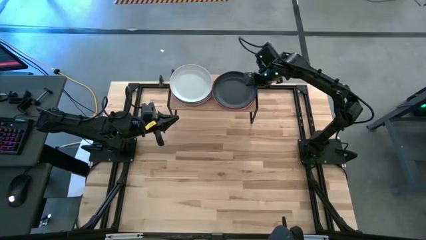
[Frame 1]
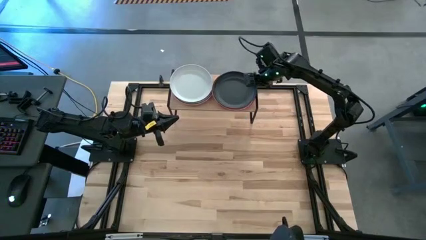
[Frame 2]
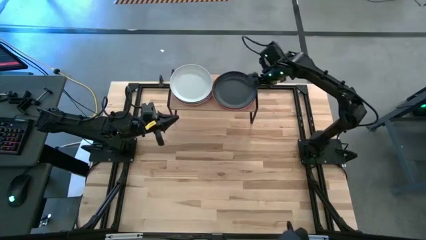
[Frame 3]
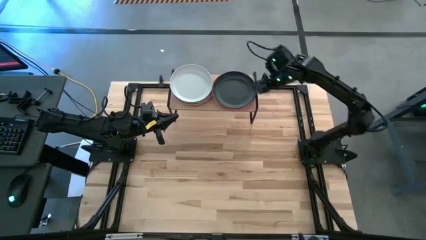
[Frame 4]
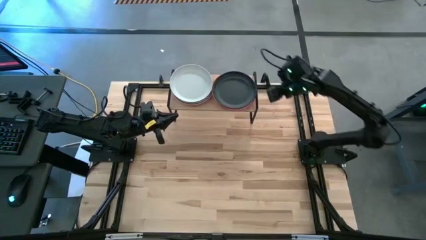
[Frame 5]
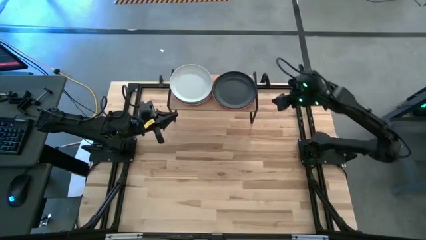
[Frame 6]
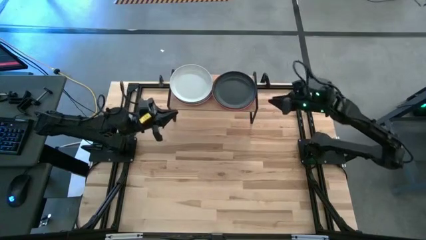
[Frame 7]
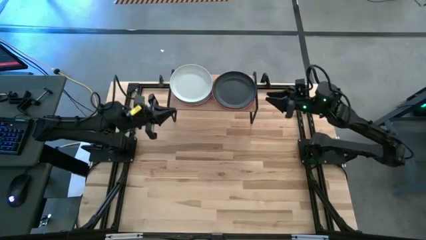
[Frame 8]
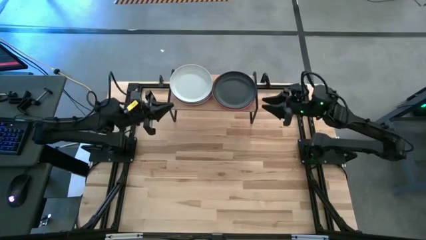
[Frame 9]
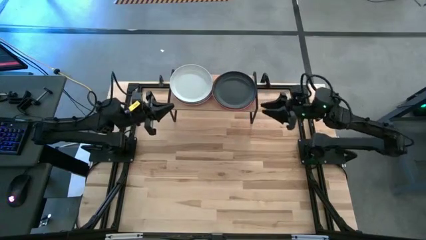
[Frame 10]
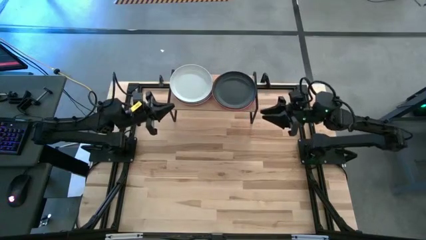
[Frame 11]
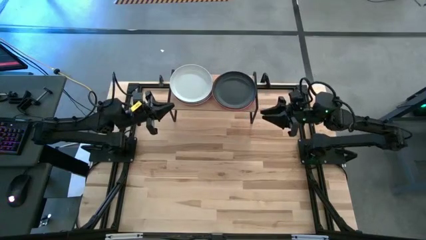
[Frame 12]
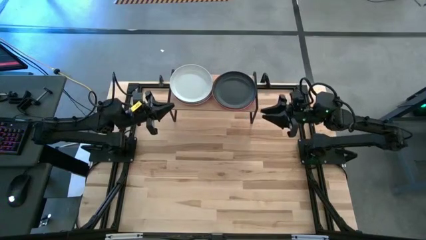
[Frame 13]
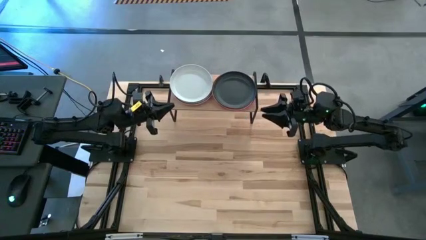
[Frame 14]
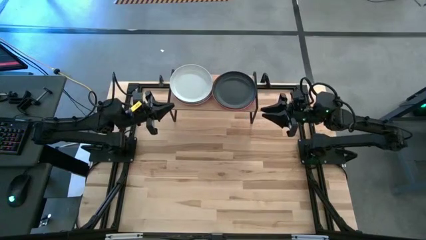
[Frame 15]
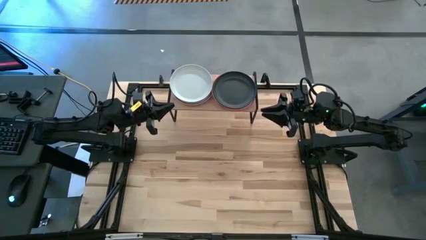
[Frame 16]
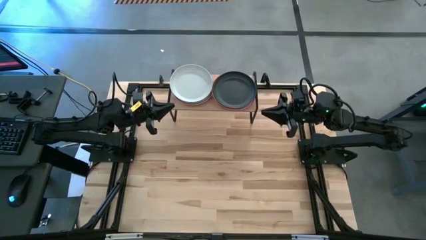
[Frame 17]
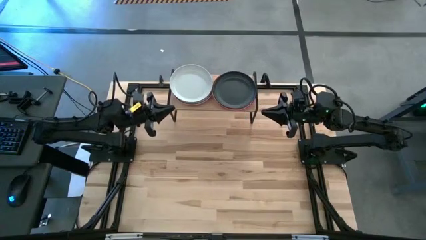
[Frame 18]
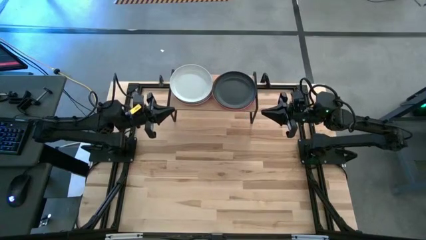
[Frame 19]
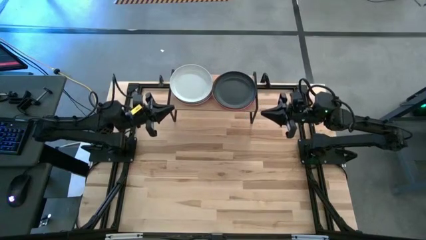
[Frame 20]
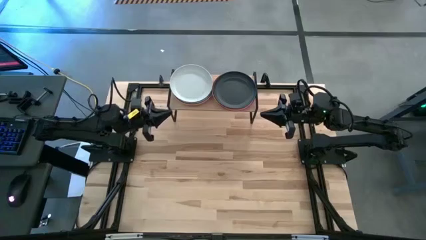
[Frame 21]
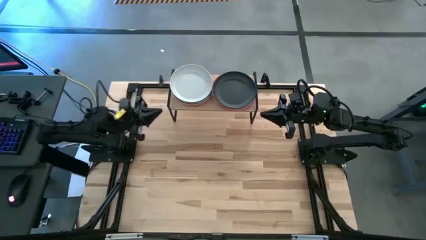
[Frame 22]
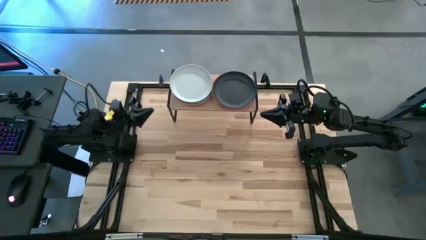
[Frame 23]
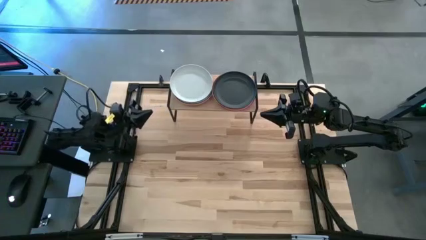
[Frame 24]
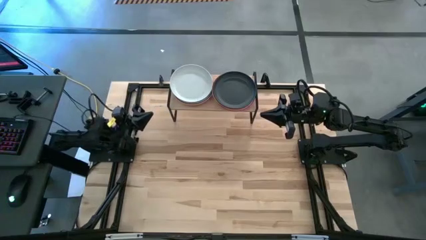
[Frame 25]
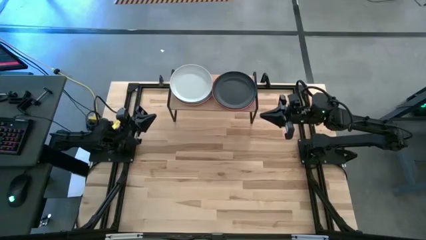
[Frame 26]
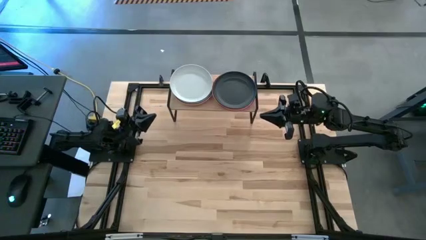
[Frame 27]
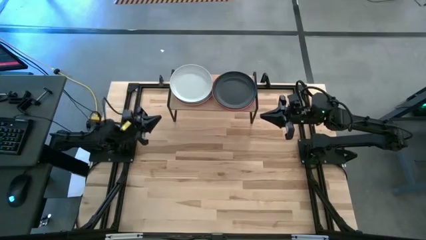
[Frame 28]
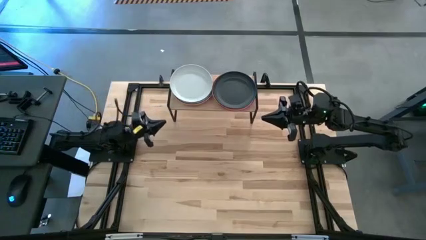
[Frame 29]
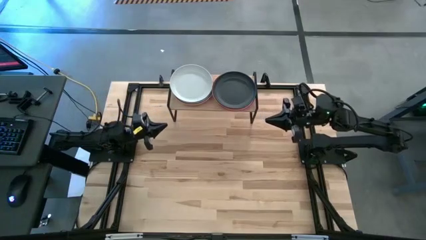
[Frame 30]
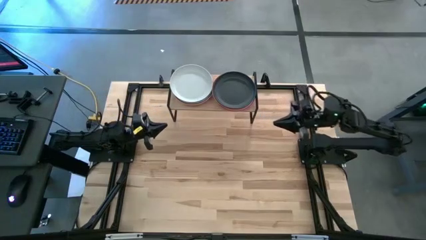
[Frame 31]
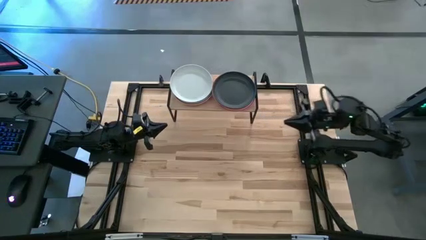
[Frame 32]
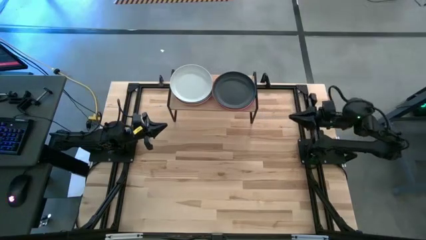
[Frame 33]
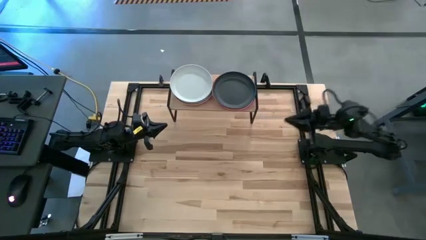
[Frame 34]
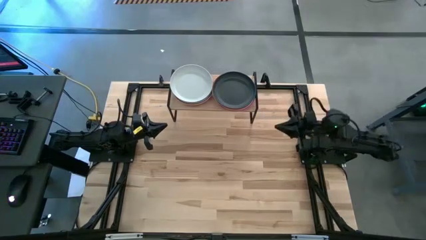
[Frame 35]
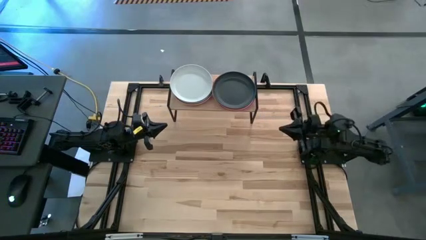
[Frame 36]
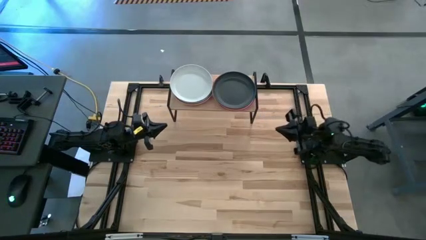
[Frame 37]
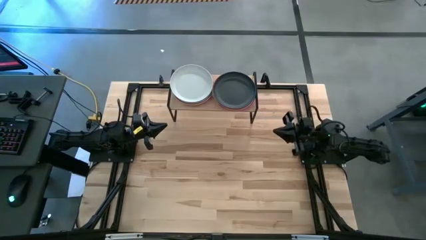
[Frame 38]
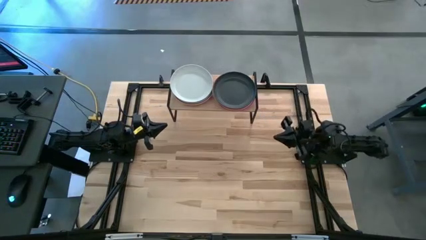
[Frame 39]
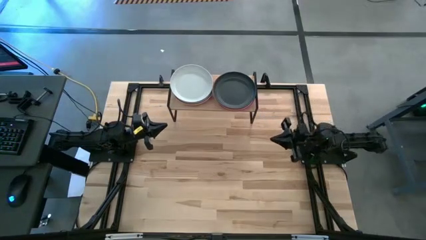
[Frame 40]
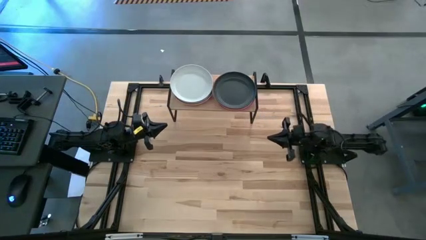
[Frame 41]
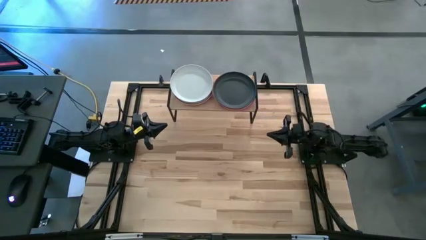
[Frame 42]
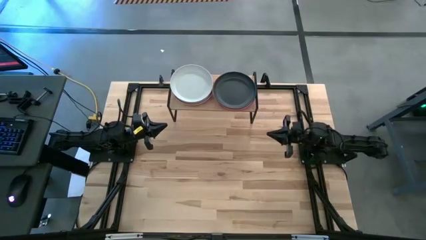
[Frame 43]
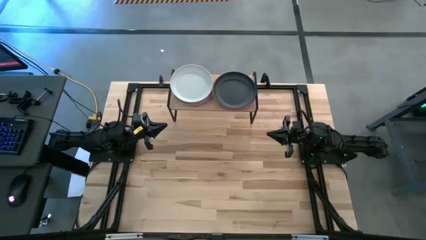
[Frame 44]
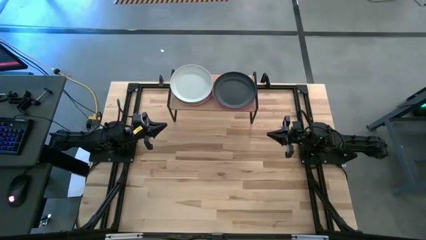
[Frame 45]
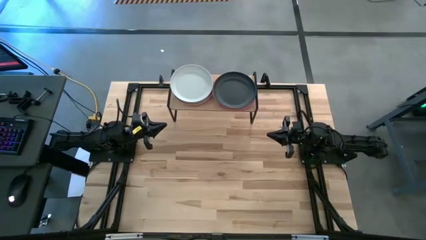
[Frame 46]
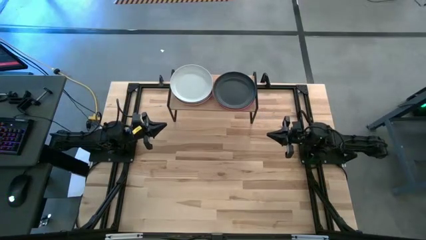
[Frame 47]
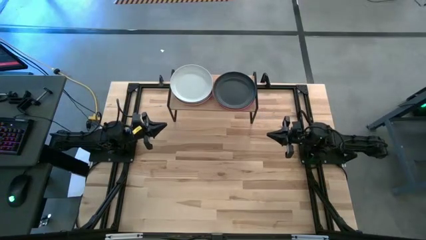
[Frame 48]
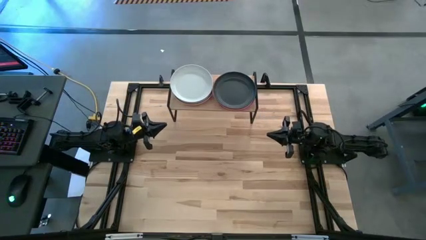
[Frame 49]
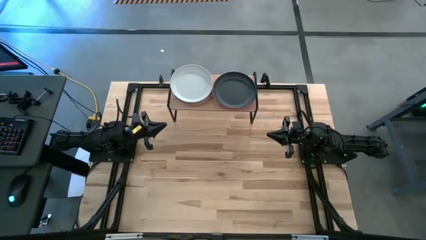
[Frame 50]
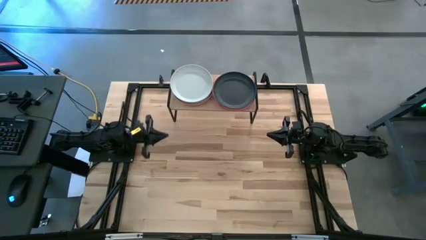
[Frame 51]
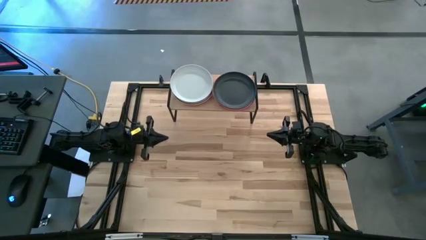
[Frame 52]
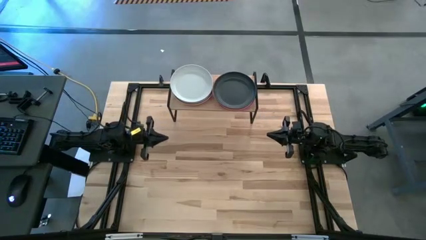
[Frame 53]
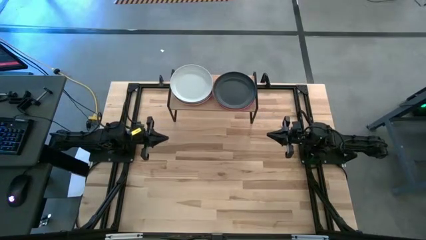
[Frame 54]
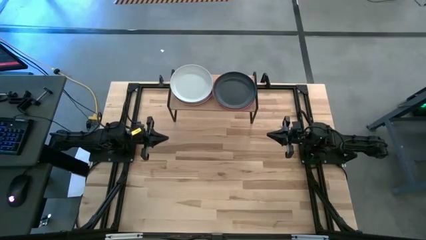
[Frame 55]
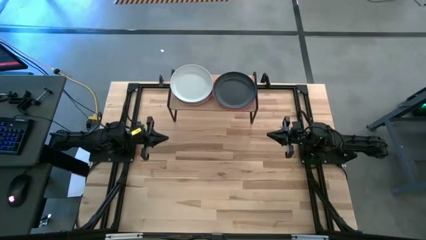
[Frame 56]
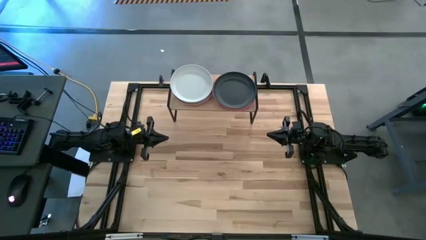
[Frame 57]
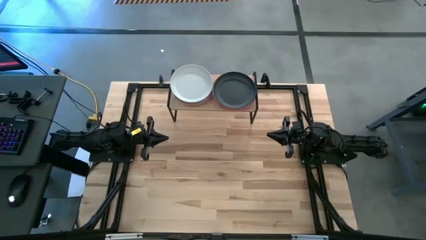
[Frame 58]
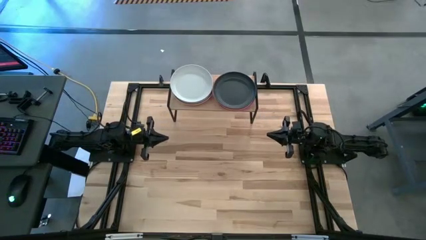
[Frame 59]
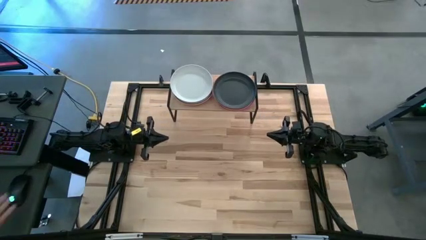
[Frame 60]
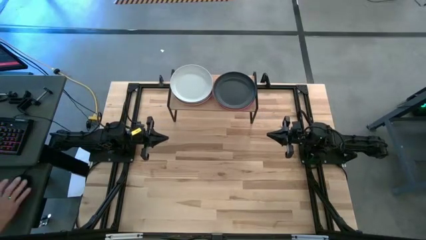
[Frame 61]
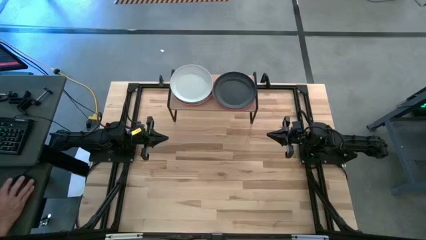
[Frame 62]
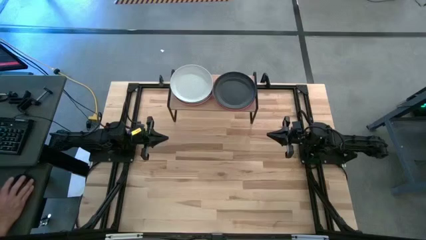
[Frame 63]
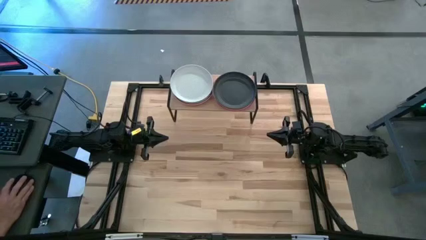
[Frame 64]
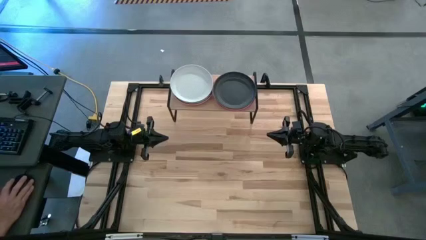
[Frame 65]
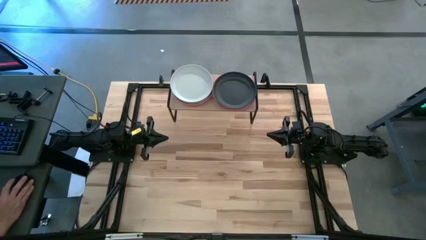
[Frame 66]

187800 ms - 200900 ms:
Task: Place and stack plates onto a shelf
Return to Home Position

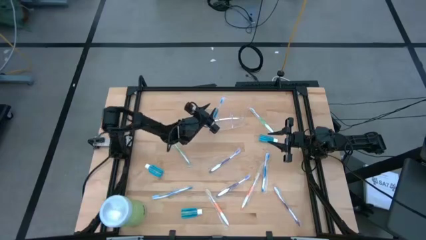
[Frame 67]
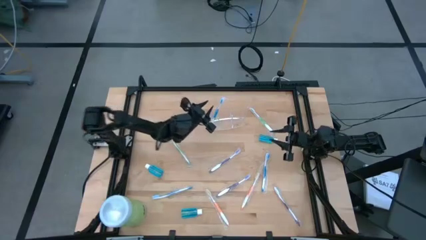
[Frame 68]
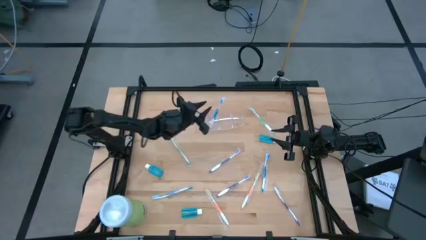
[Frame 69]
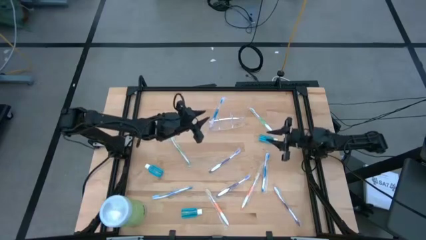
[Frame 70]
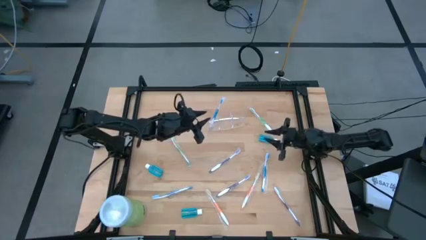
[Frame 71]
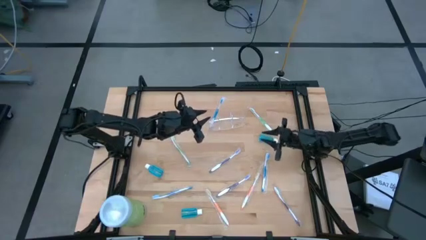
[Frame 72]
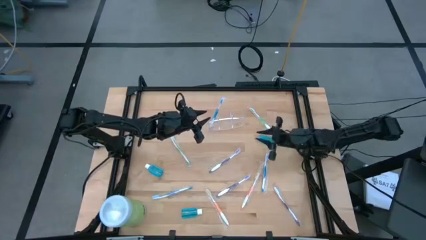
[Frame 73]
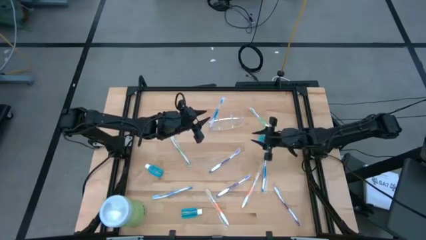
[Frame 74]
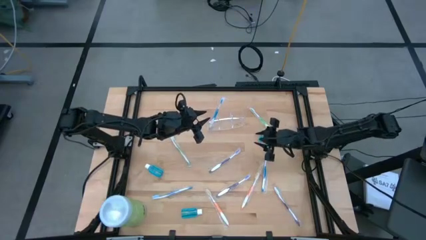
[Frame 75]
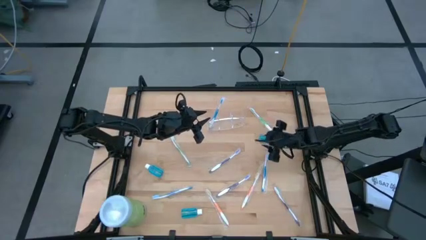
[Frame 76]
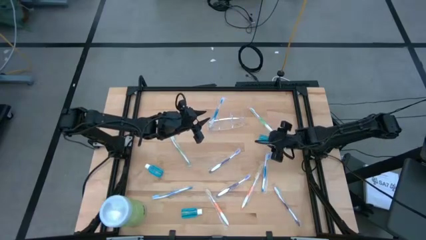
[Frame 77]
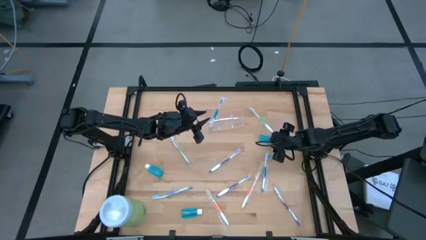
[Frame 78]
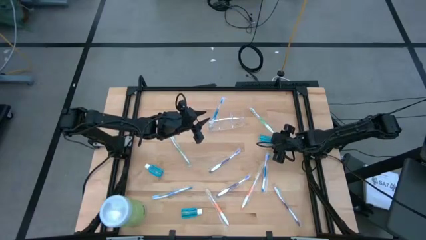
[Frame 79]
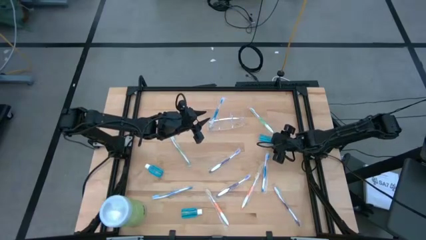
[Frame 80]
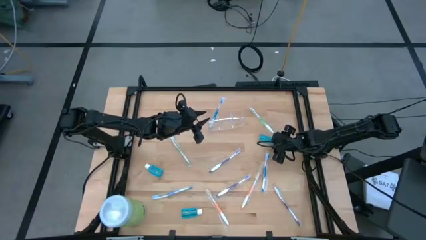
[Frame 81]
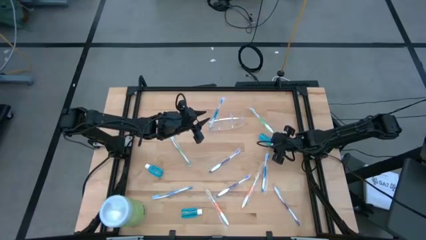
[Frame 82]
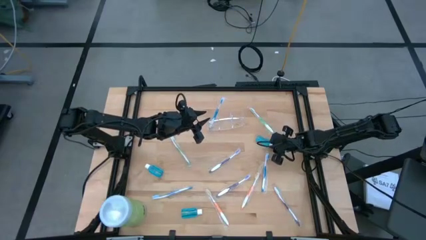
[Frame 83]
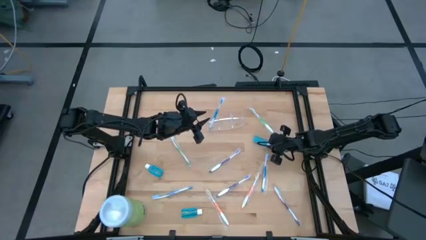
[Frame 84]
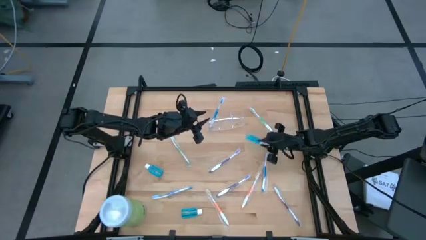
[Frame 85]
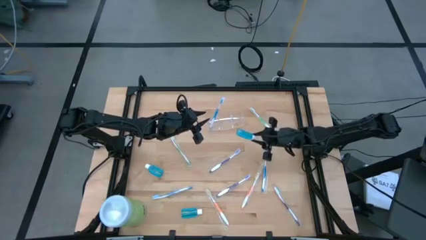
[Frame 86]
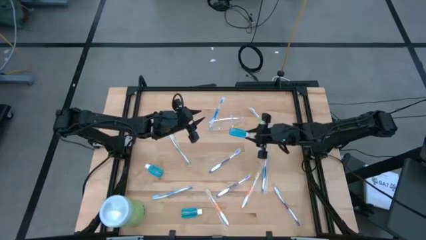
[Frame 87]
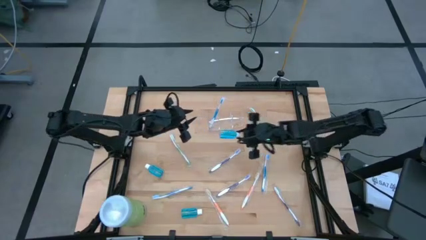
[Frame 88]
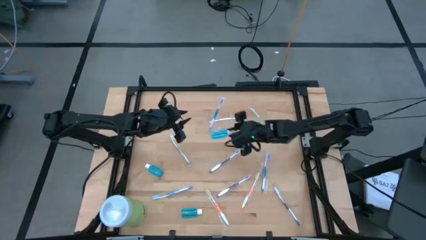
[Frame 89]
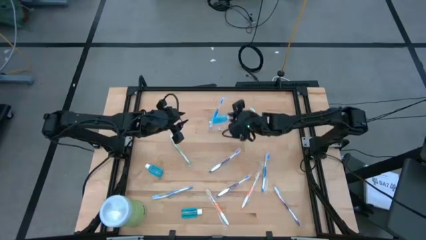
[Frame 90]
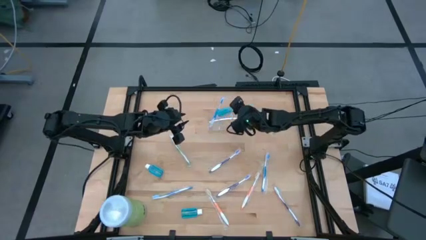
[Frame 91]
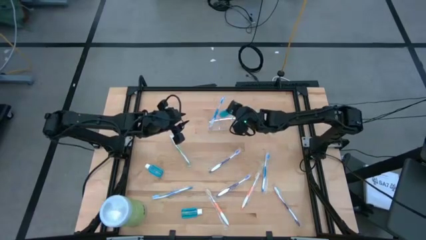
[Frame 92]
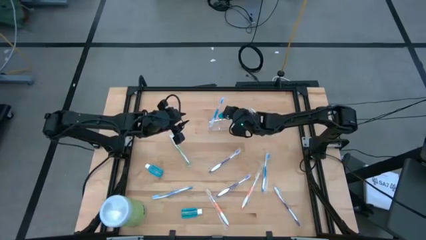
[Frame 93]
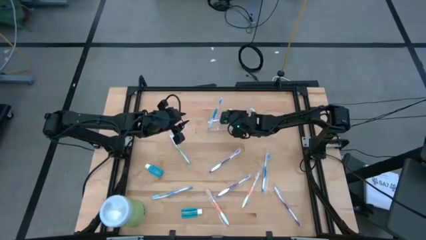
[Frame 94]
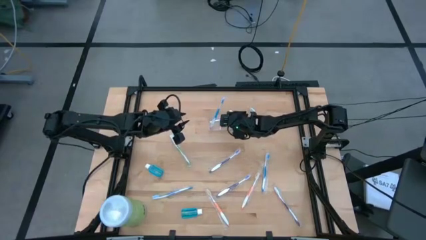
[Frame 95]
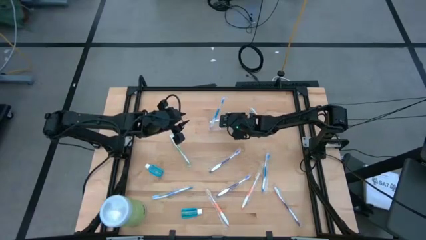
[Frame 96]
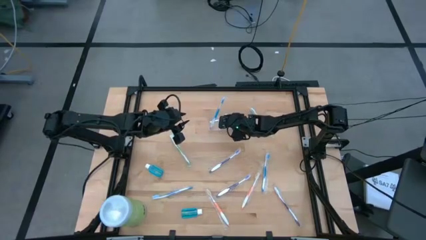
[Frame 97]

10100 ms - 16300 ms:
Task: Pick & Place toothbrushing station
Put the right mouthwash into the middle section of the transparent organizer
